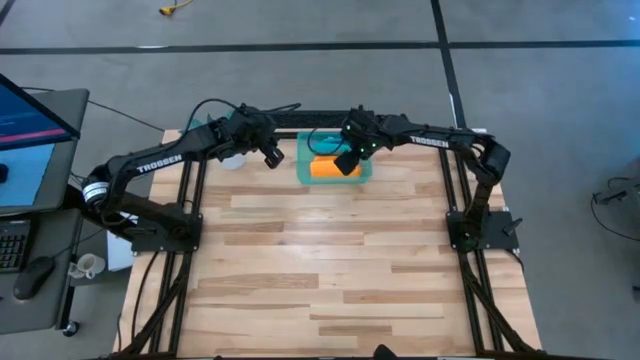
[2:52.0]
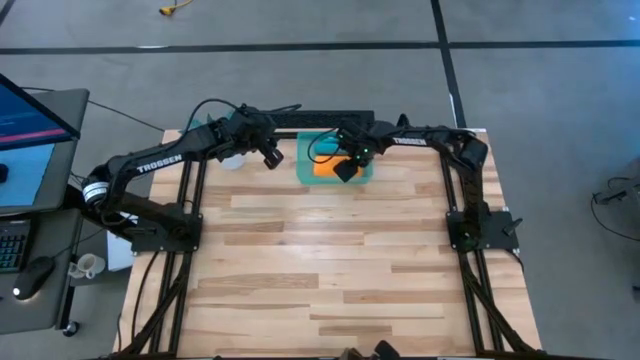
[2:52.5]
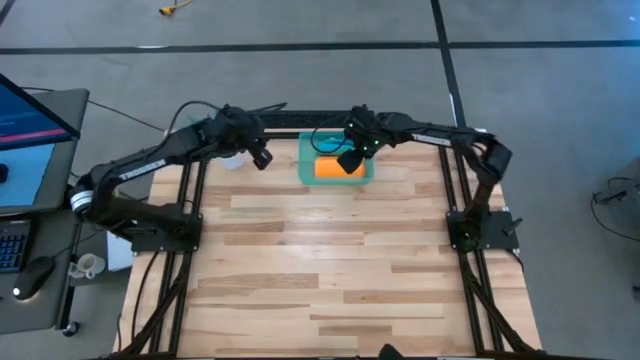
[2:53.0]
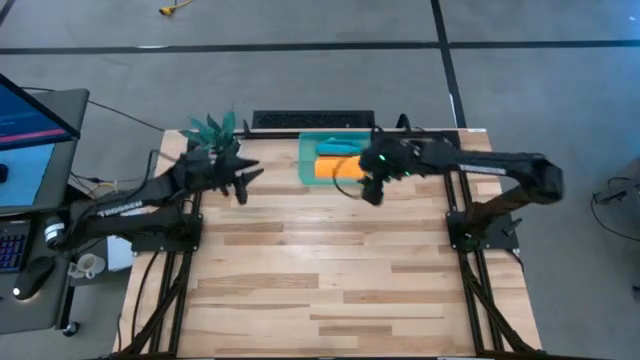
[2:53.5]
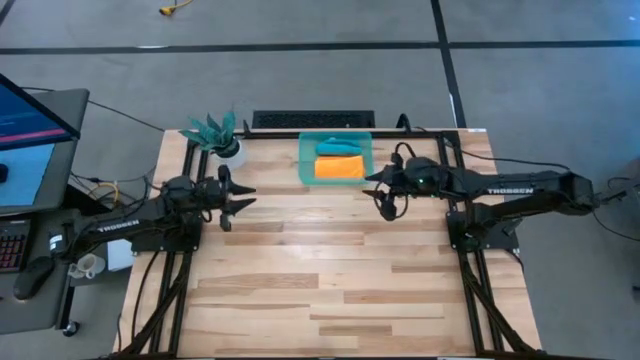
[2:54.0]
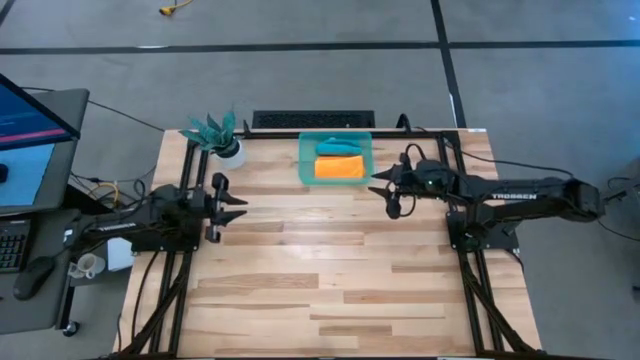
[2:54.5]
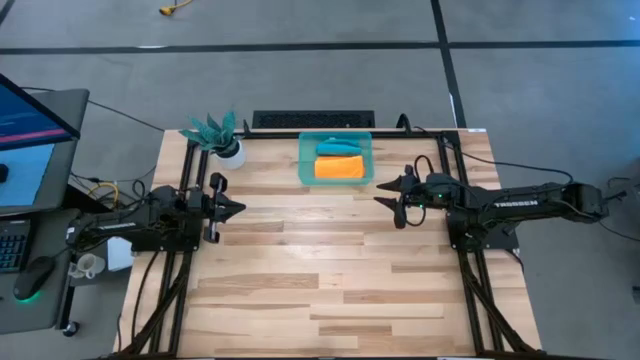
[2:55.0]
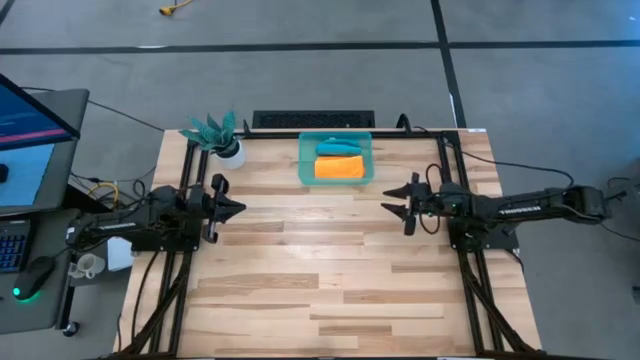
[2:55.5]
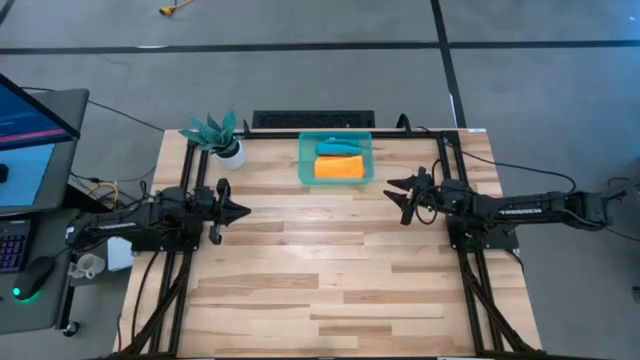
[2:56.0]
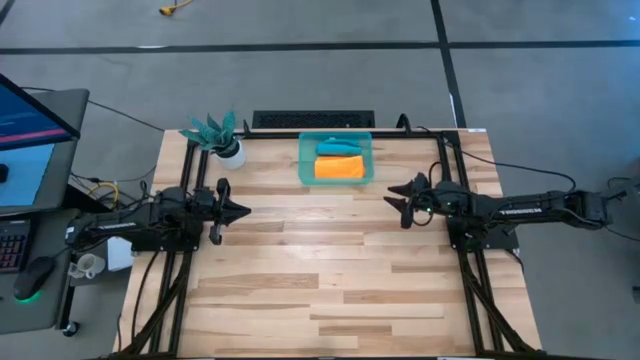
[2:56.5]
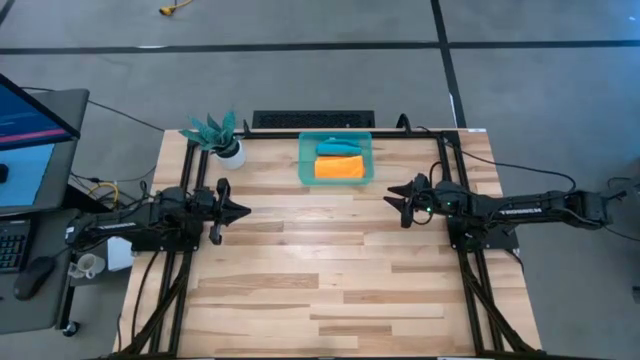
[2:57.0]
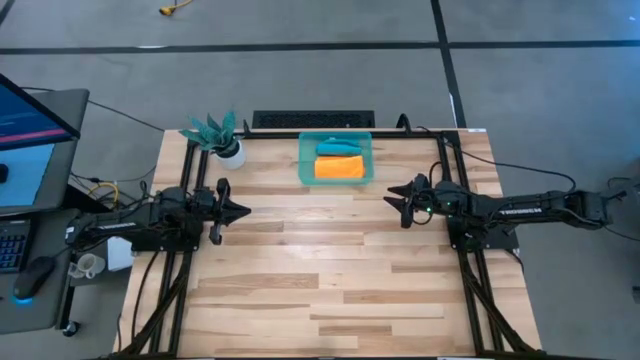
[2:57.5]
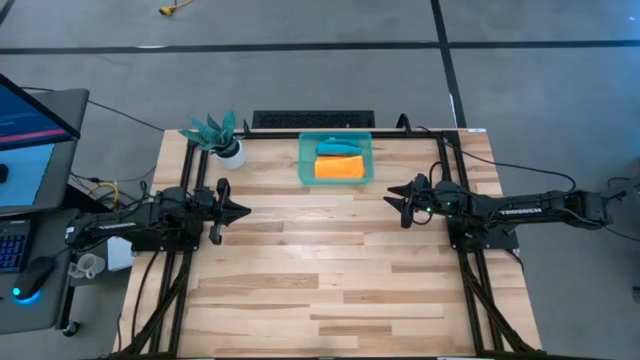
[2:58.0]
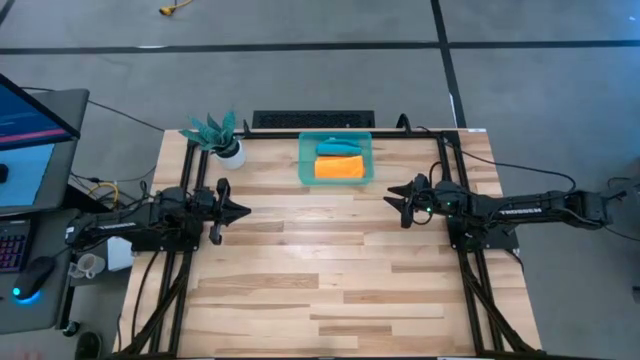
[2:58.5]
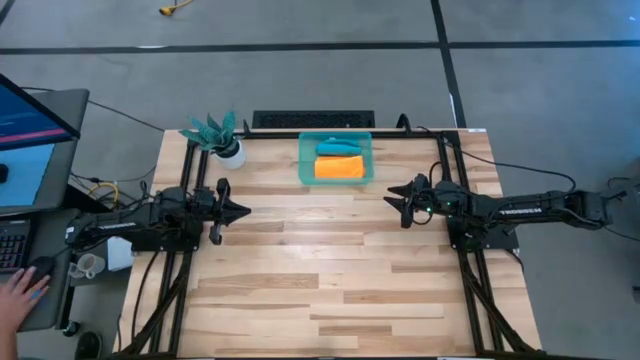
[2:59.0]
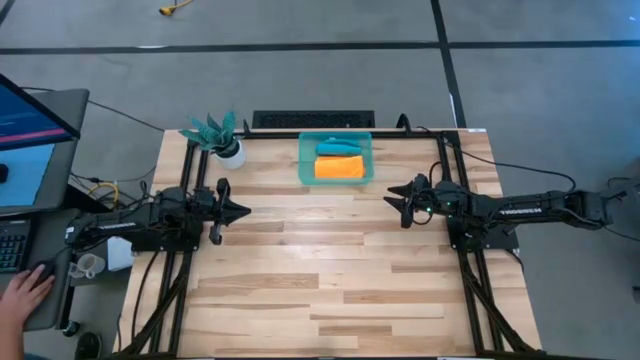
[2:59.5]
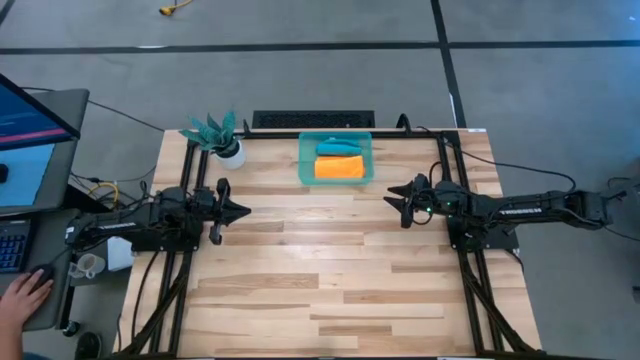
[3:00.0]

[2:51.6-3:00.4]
Task: Roll microfiber towels into tight, uniform cylinder then place into a basket
Return to Home Position

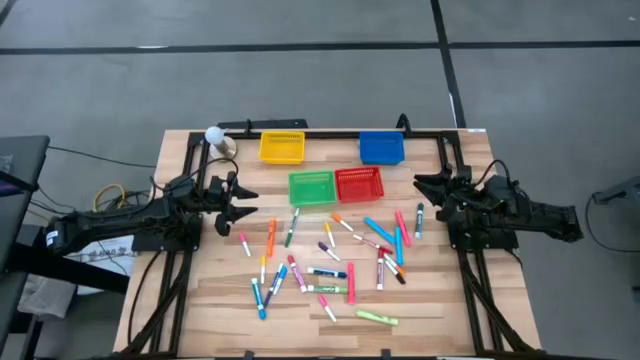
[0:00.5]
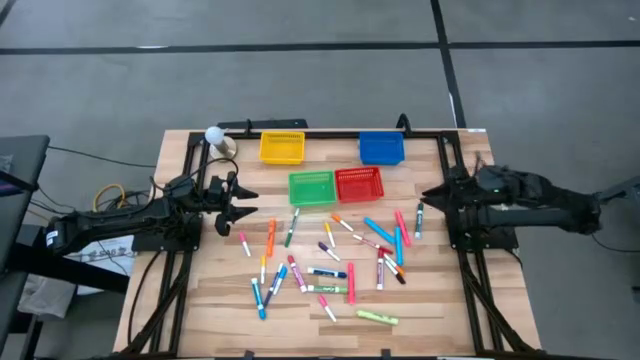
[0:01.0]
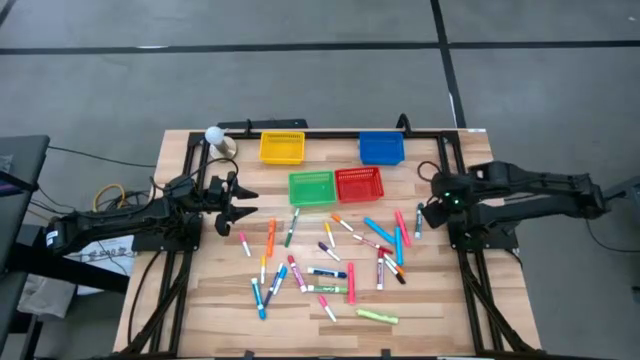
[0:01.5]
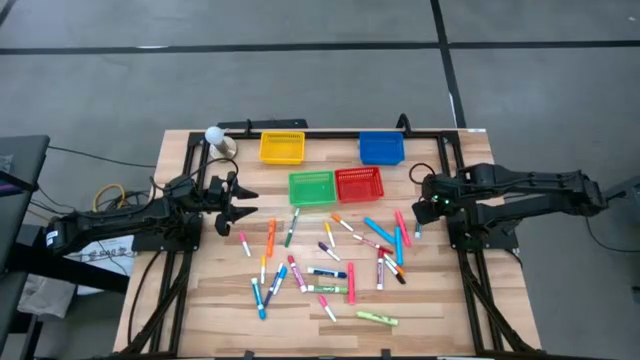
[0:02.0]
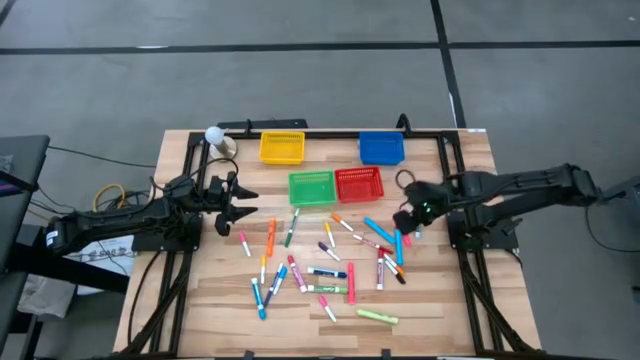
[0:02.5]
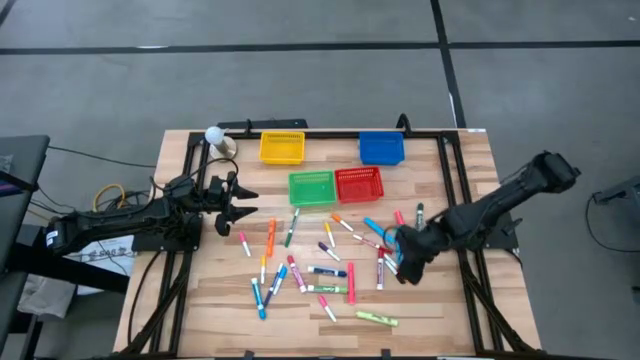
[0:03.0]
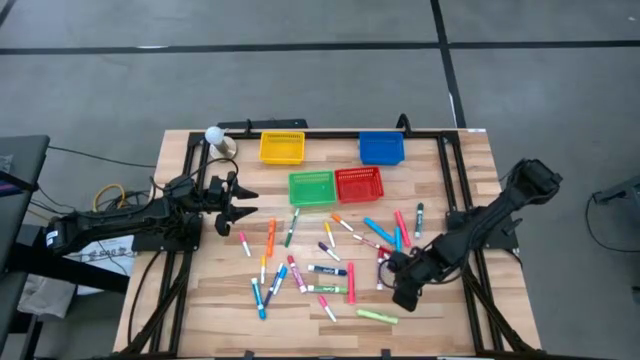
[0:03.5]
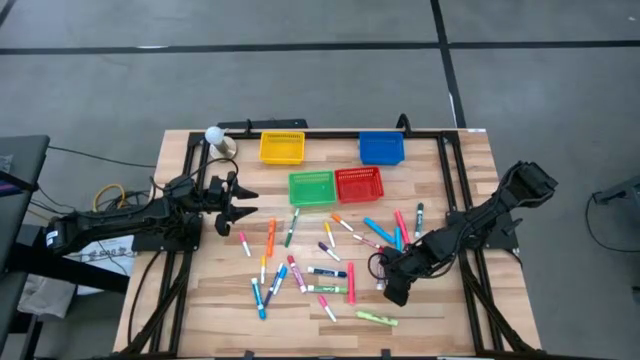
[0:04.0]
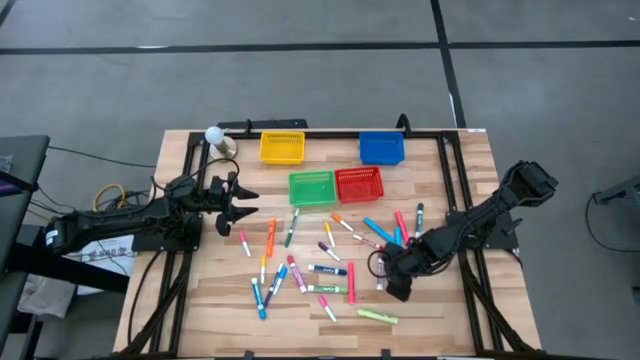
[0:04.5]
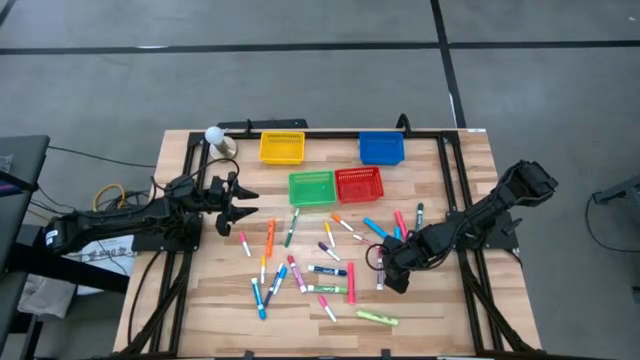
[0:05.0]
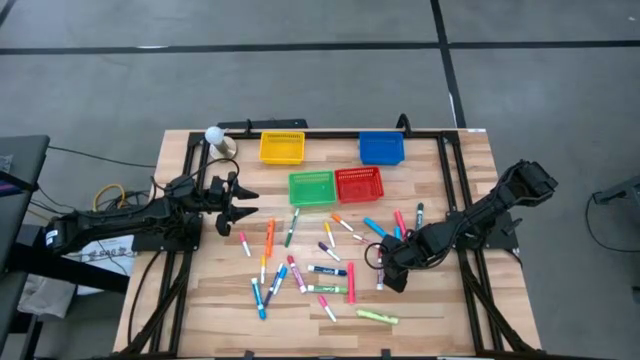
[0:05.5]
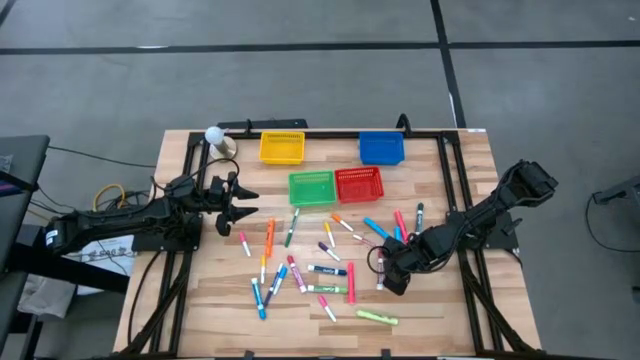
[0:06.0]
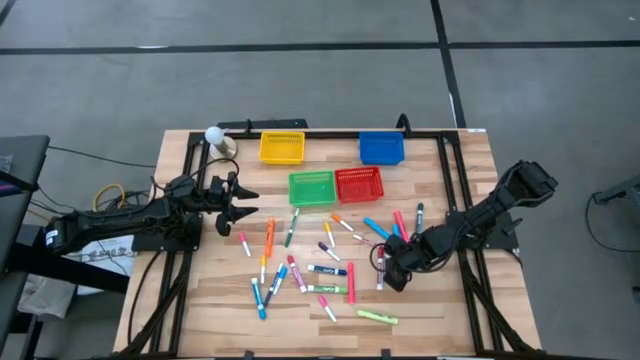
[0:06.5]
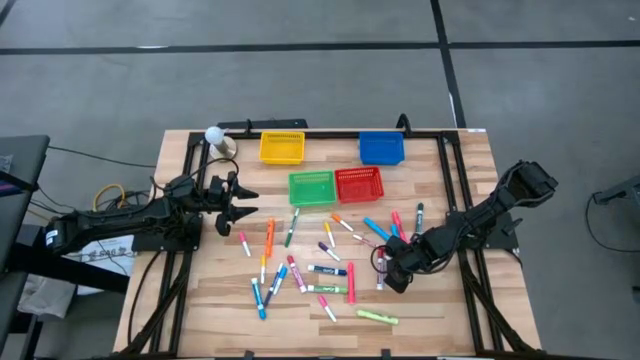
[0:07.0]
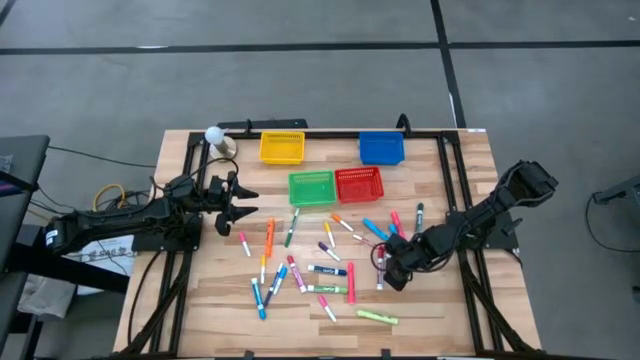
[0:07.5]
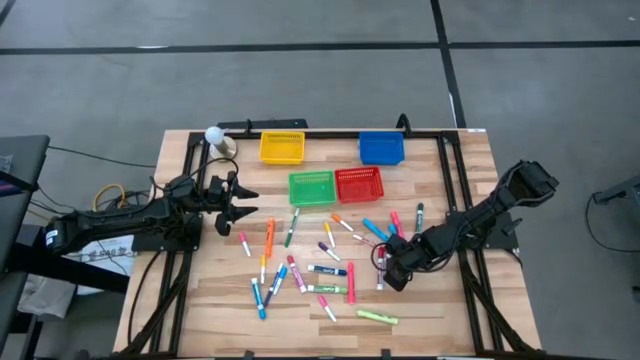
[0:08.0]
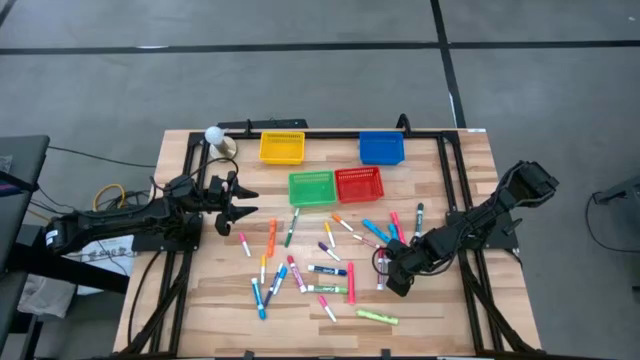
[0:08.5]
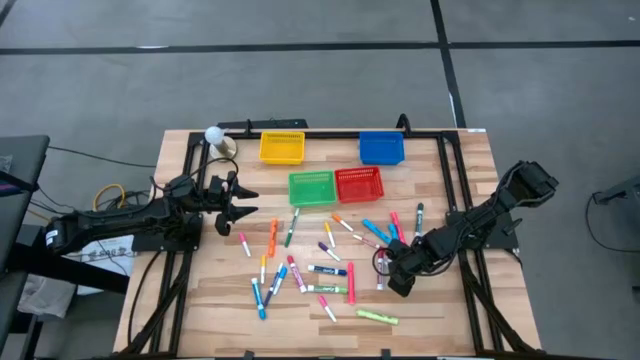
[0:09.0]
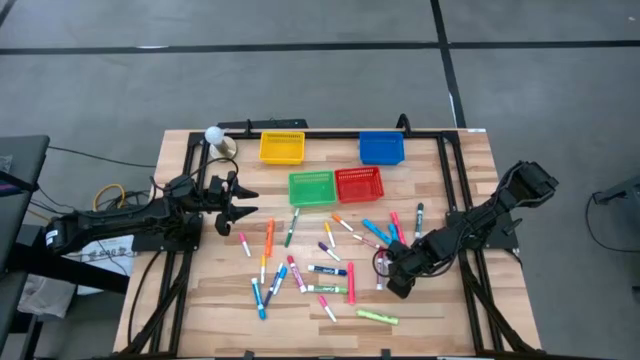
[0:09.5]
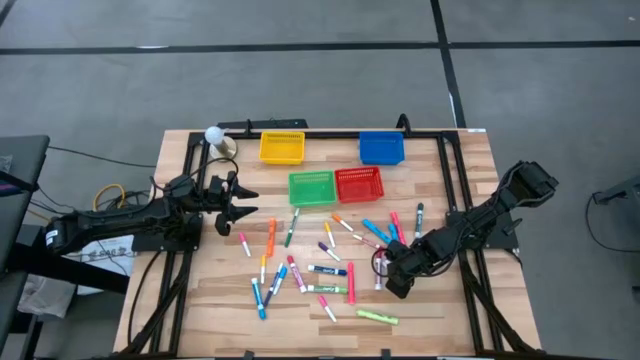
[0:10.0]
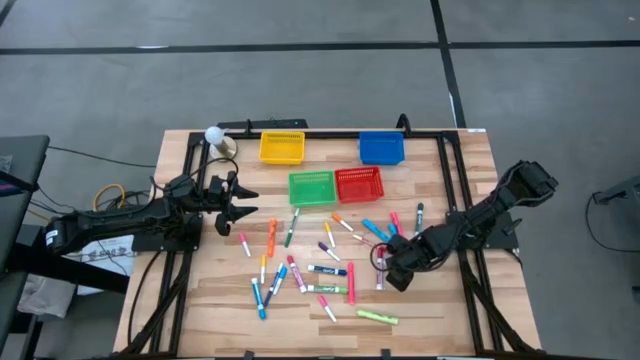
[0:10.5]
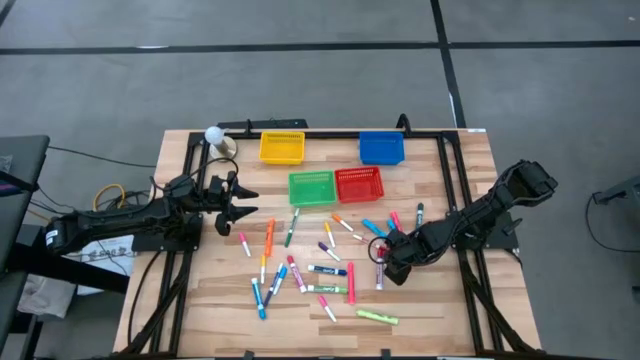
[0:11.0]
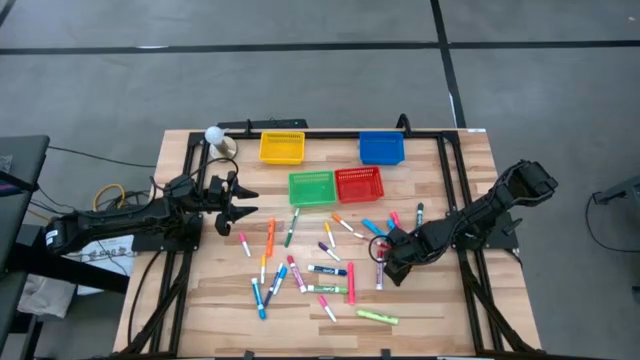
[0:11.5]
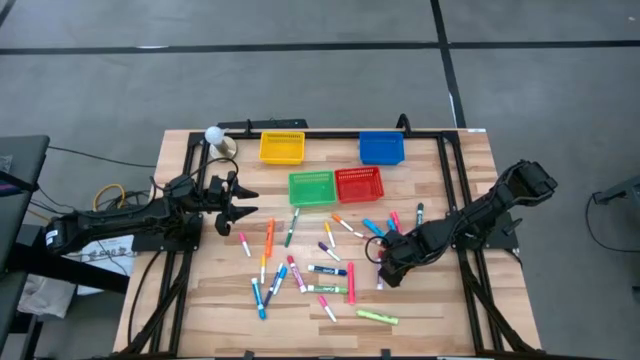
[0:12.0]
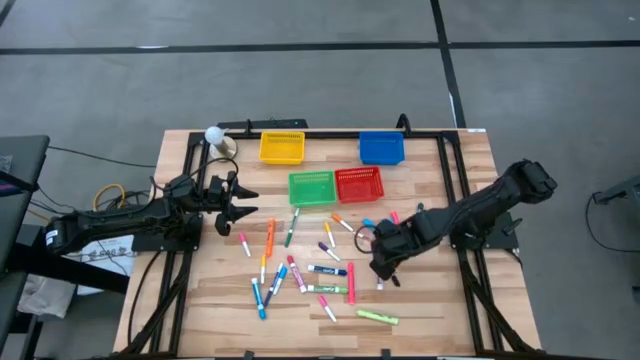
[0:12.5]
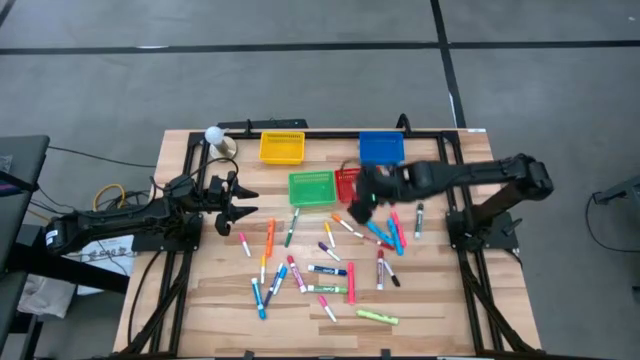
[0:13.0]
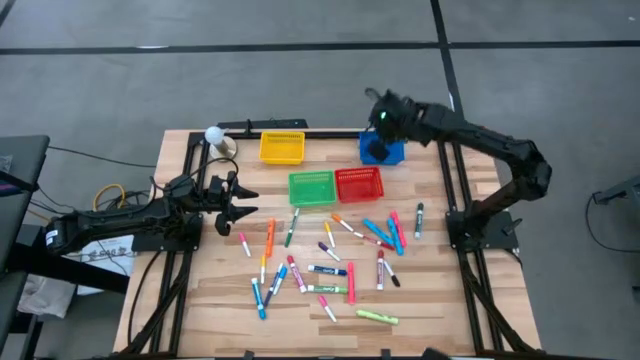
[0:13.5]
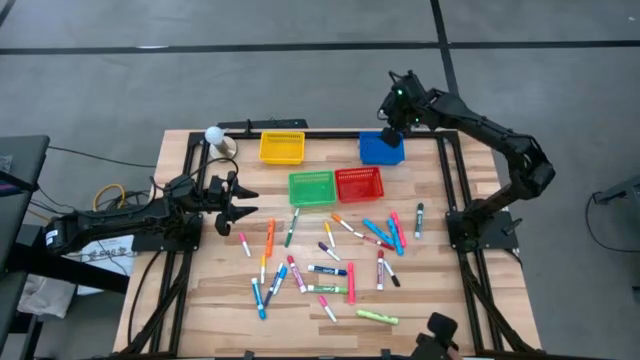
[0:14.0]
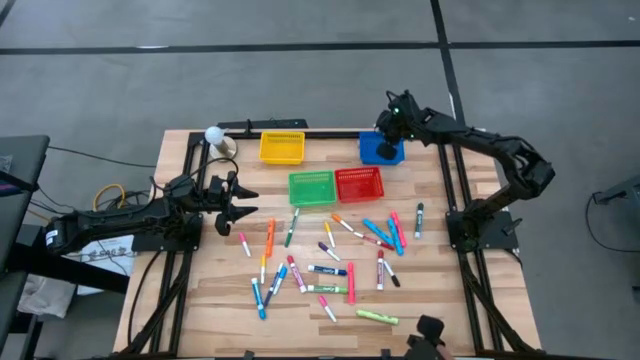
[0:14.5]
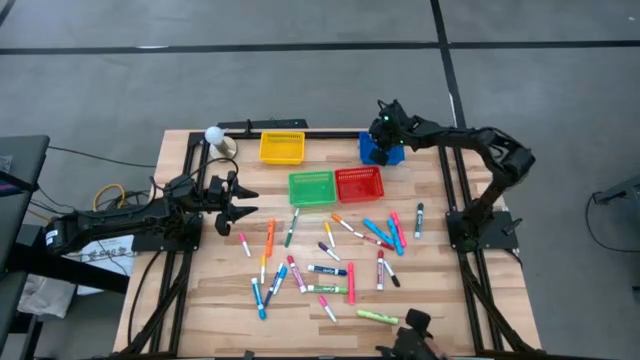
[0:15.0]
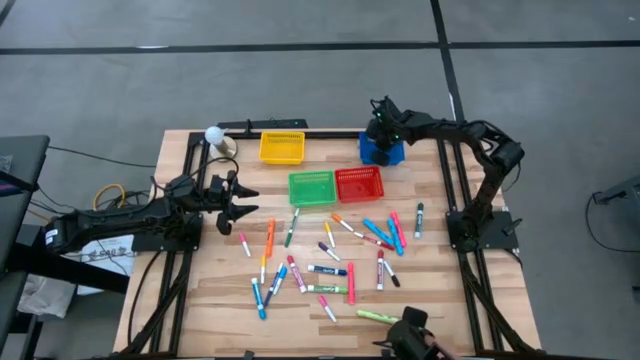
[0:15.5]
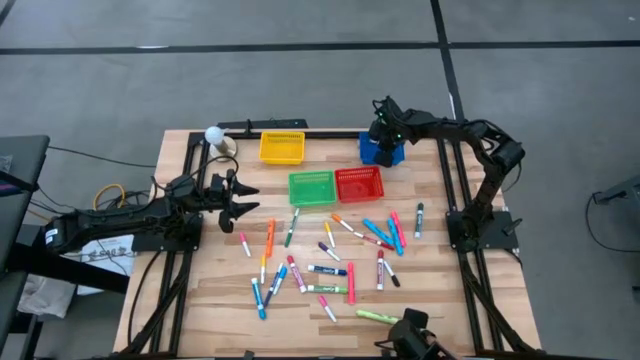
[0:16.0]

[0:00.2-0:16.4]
Task: Pick & Place Markers
Put the right small orange highlighter pen into the blue bin
